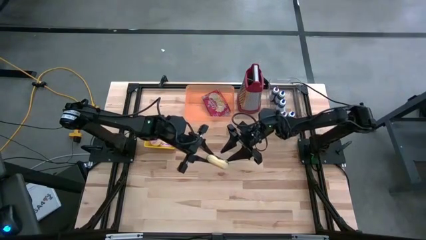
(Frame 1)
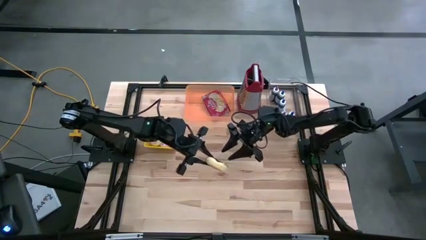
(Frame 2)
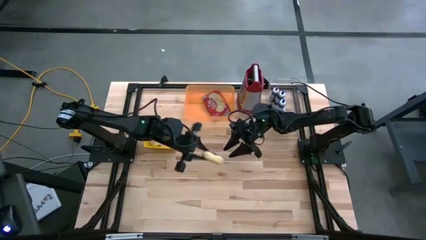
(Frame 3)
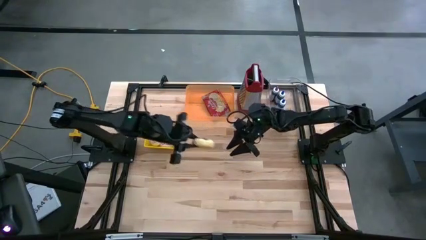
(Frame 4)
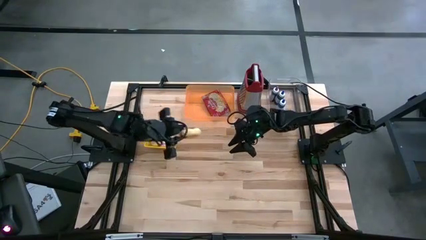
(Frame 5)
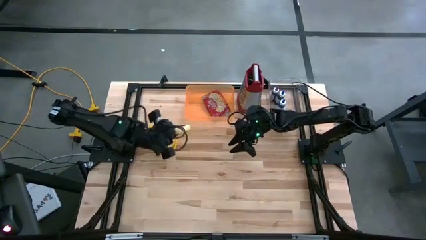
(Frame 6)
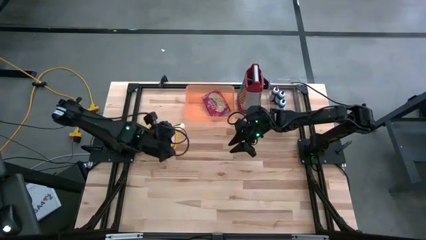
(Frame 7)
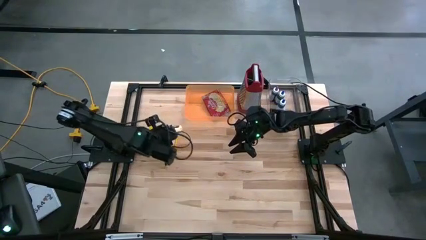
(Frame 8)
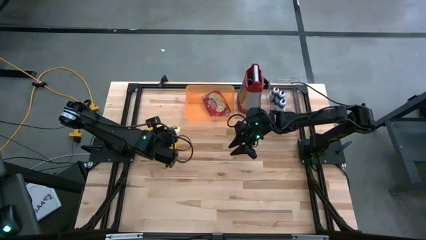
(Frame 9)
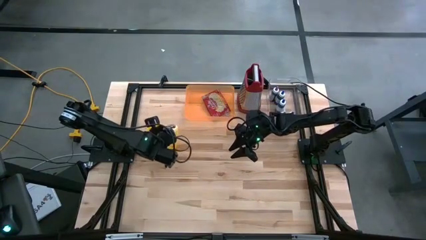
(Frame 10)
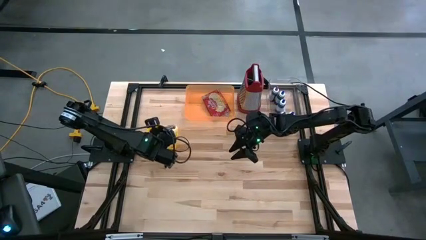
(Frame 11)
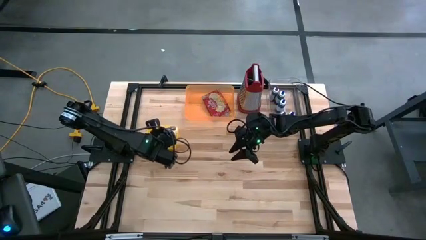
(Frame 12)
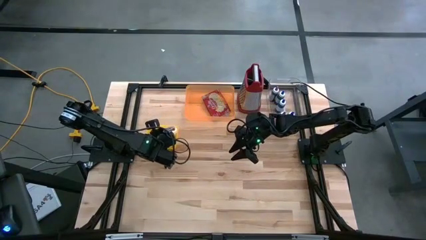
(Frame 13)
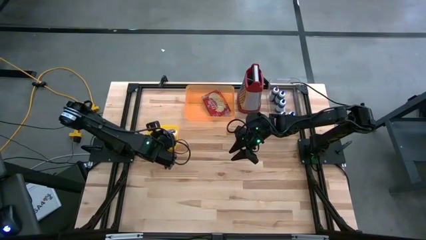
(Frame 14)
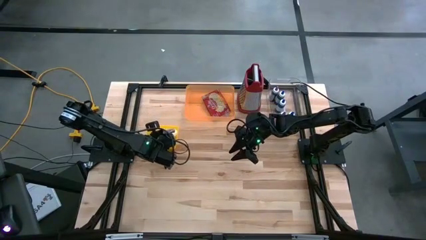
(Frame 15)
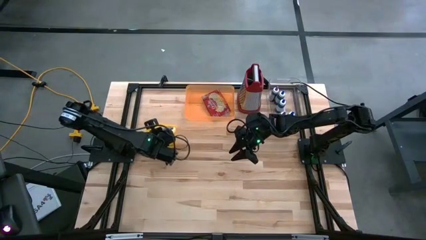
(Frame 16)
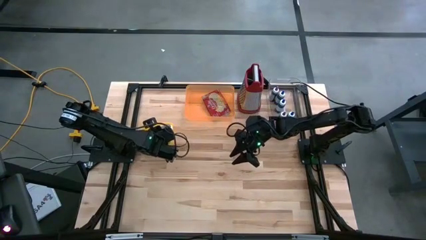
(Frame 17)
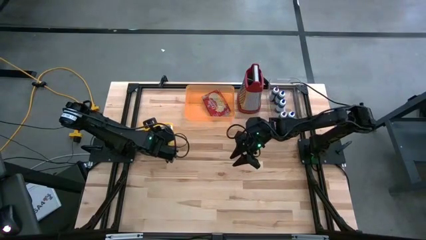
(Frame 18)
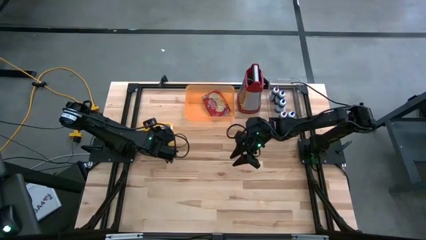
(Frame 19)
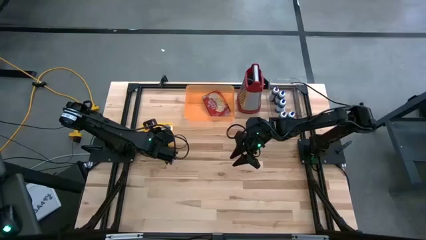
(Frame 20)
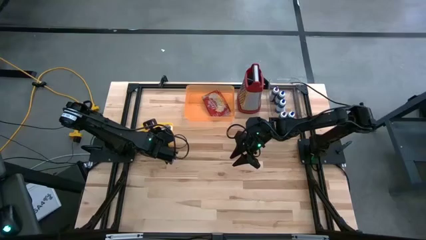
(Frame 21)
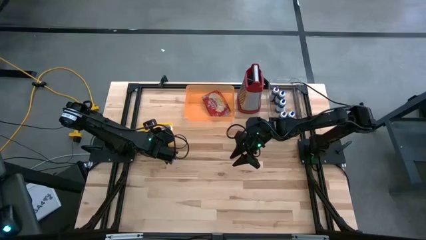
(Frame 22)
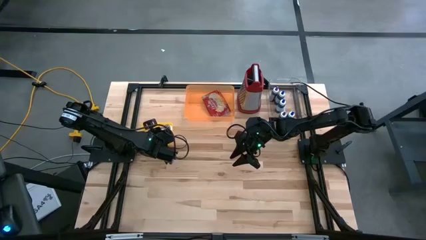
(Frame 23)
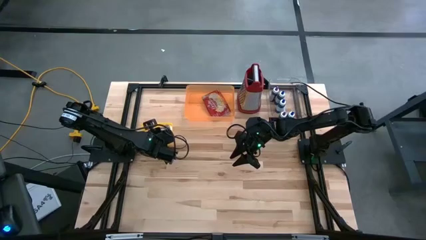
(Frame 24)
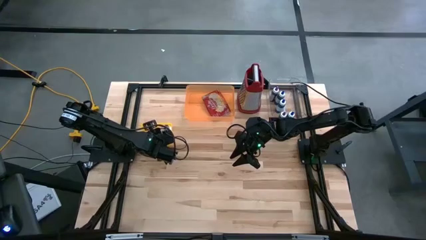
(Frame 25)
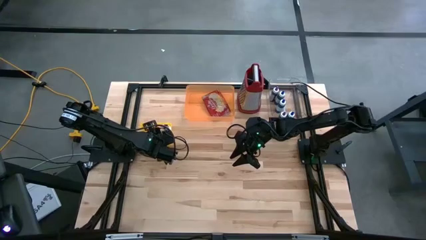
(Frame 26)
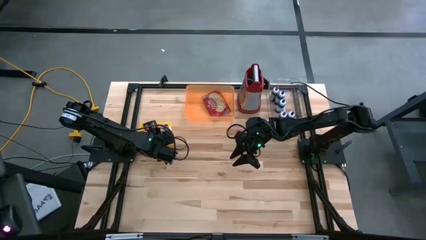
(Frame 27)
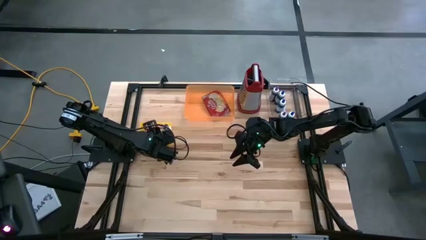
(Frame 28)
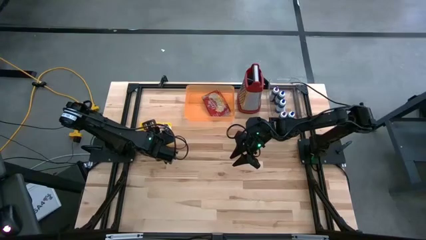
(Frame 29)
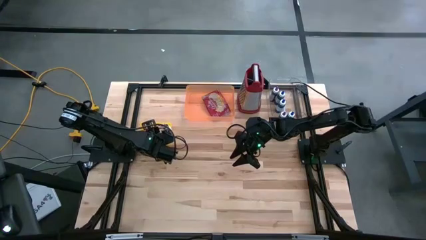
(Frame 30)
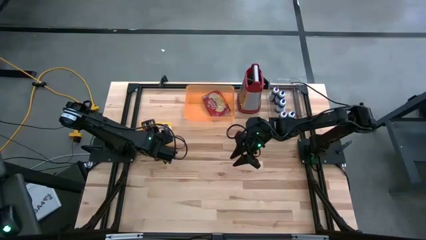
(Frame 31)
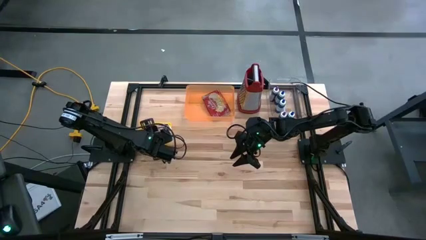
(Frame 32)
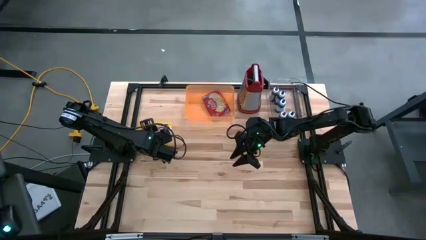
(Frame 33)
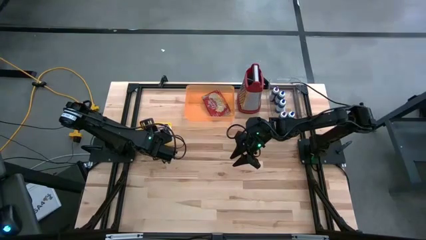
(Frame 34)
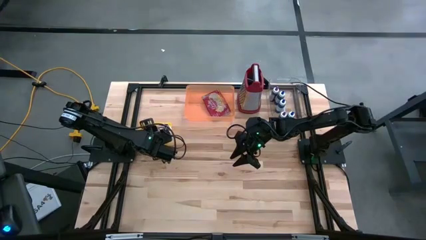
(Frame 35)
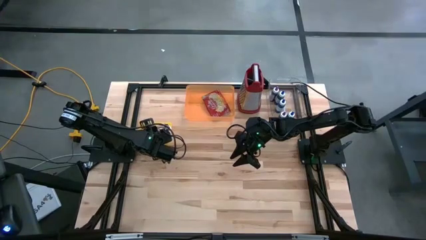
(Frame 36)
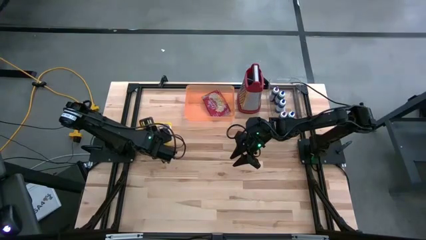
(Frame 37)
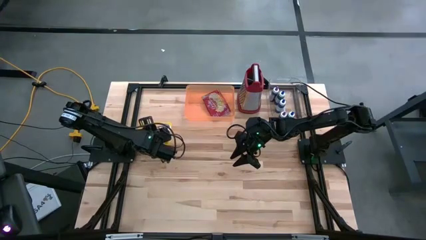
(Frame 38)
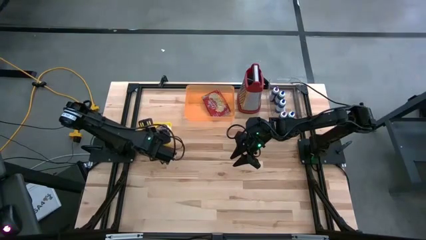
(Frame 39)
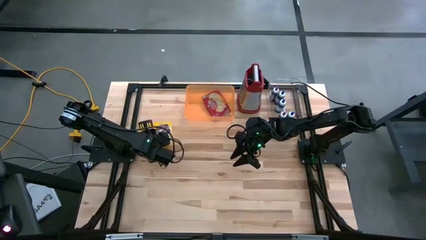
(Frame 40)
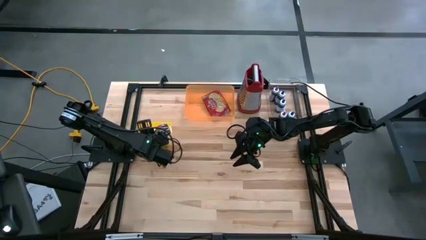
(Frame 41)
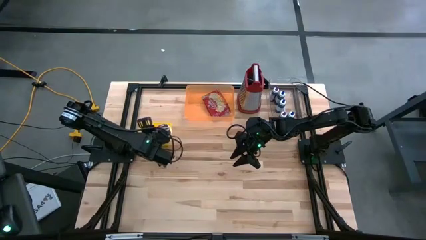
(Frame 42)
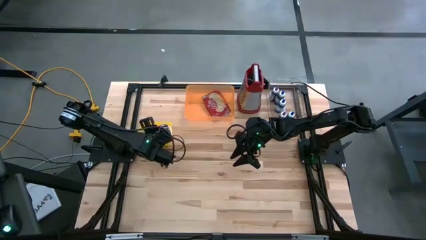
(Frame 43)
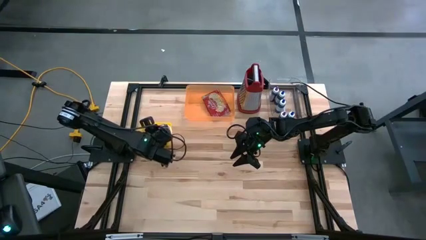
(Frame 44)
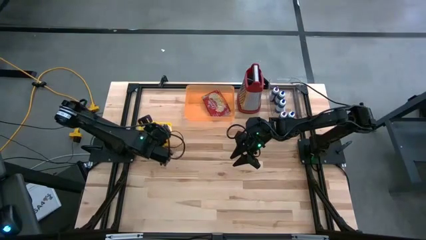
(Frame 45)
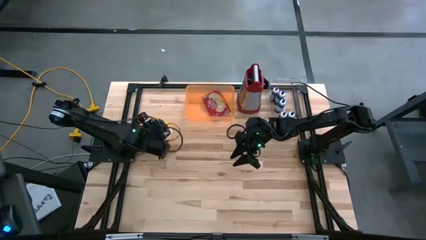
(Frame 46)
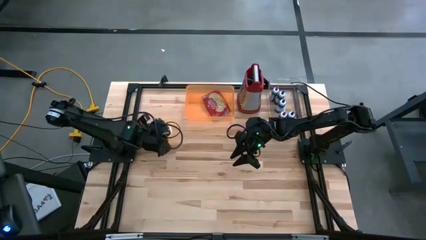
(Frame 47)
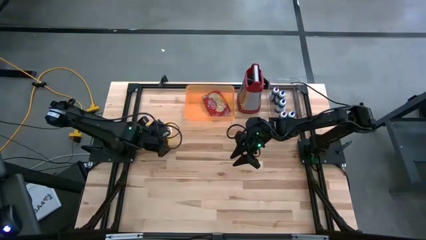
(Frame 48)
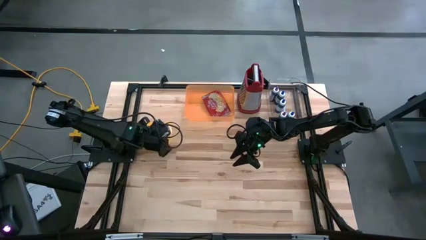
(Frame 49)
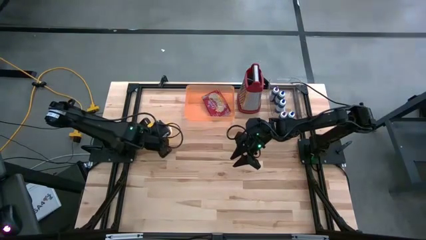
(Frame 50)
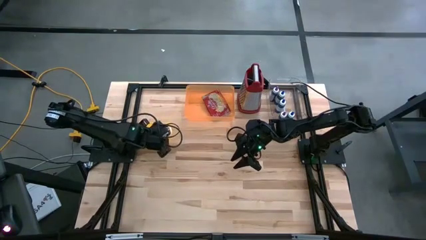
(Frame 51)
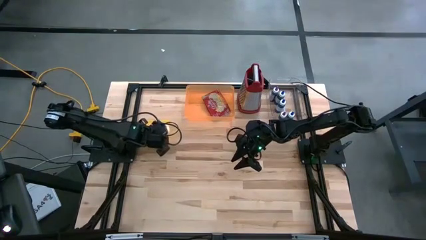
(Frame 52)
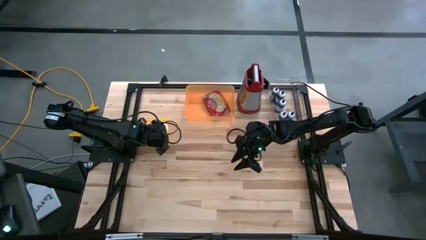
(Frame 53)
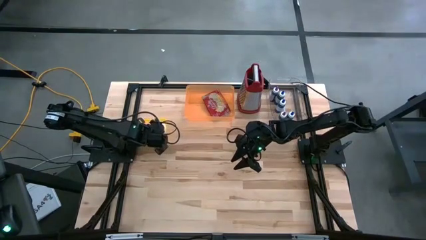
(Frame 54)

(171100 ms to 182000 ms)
Task: Pick & Place Food Item
Put the black donut into the yellow bin

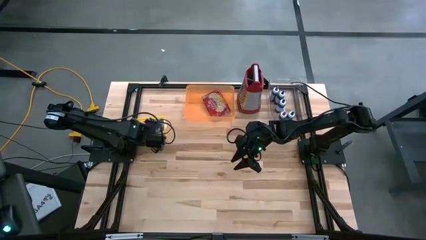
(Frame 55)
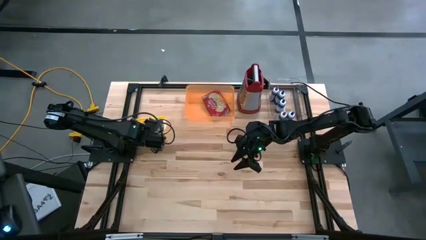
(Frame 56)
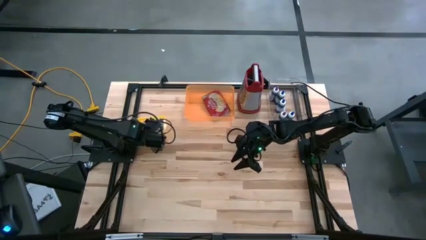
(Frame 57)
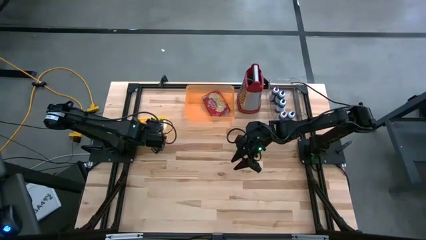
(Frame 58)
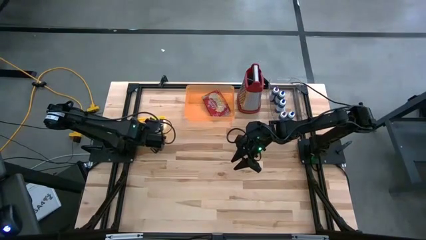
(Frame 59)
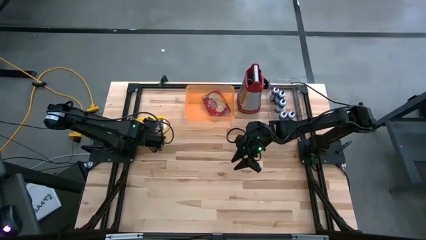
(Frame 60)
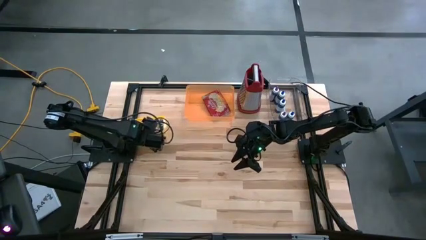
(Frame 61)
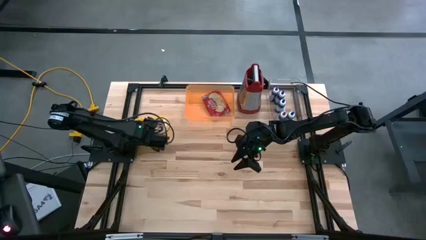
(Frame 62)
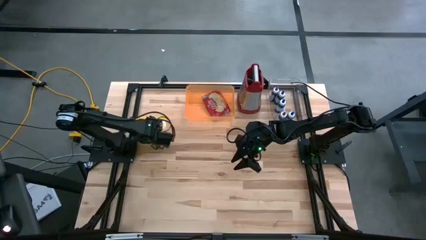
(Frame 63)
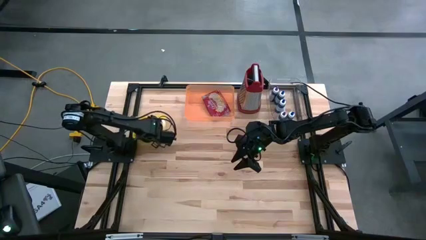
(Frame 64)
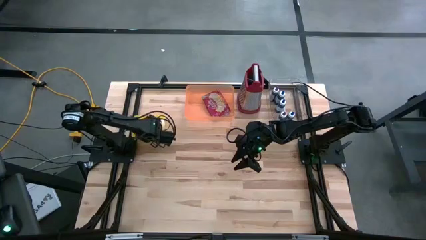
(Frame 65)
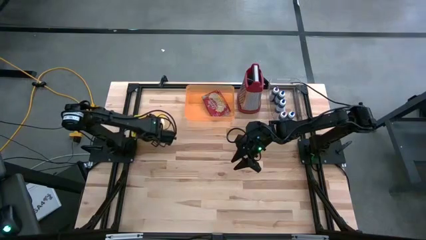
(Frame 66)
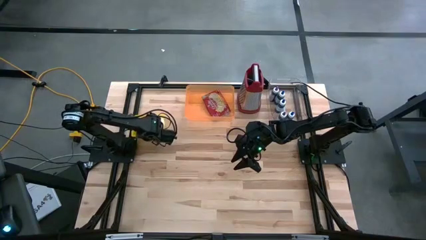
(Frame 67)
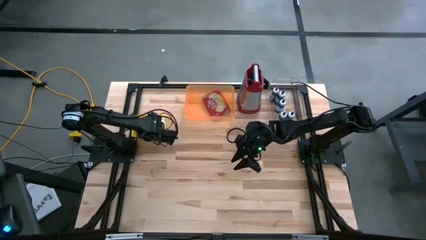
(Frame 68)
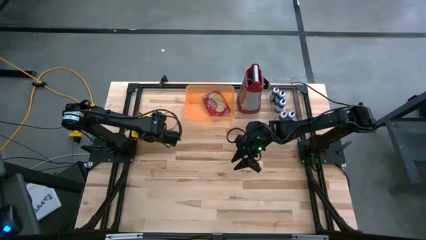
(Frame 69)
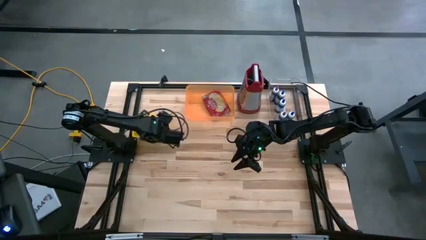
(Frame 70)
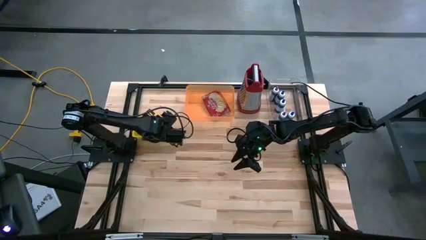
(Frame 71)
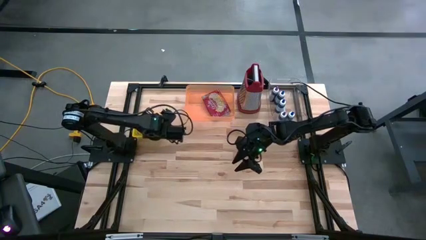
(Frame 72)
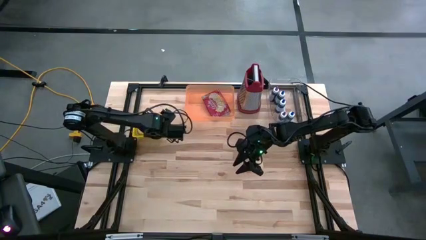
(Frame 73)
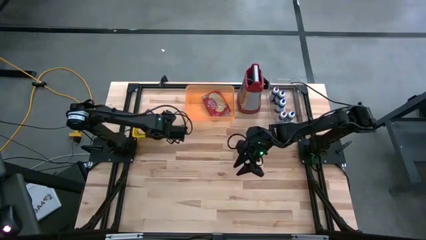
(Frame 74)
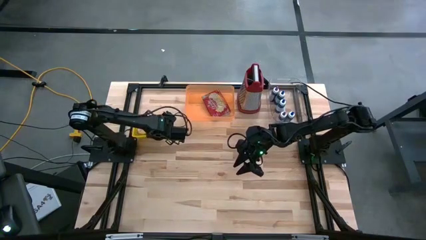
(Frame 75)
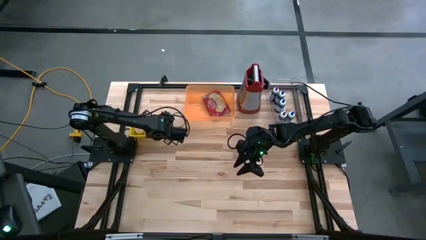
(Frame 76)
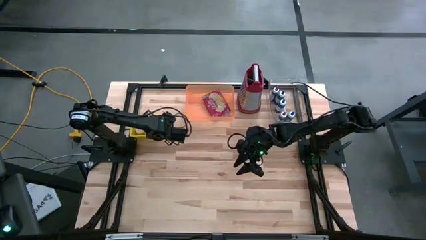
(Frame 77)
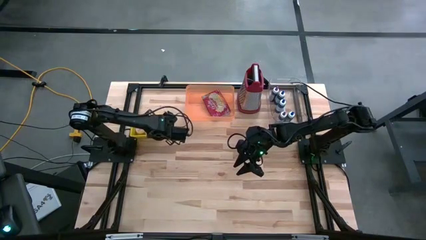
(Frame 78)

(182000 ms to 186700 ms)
Adjust the donuts in the yellow bin

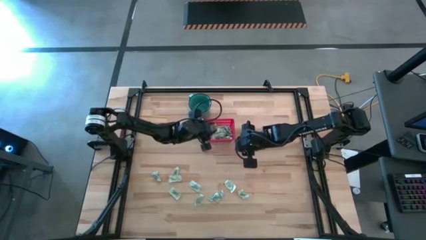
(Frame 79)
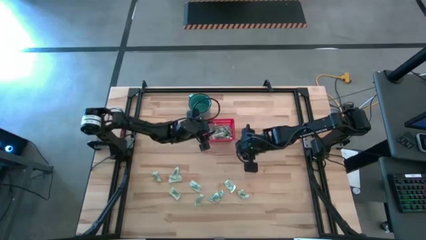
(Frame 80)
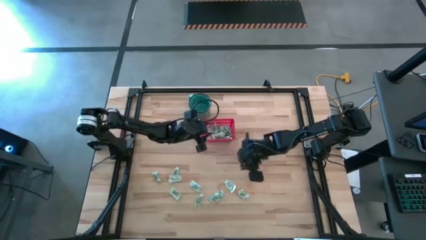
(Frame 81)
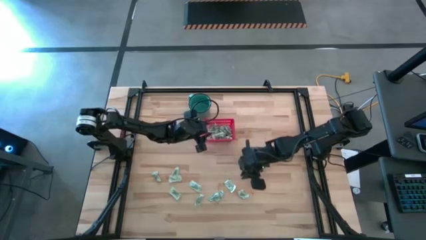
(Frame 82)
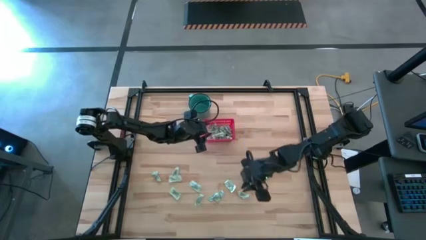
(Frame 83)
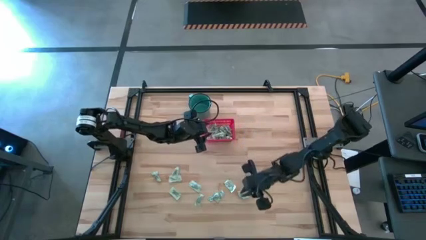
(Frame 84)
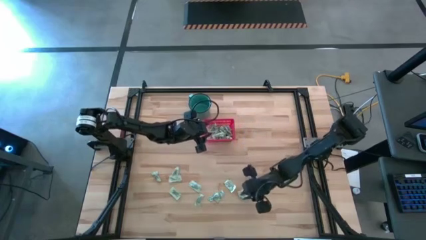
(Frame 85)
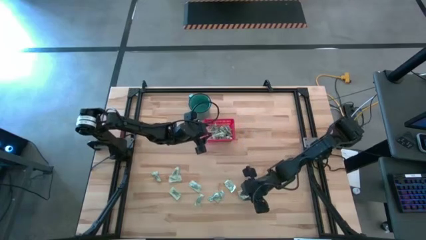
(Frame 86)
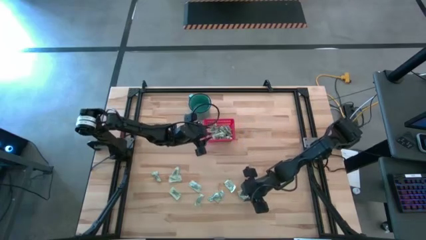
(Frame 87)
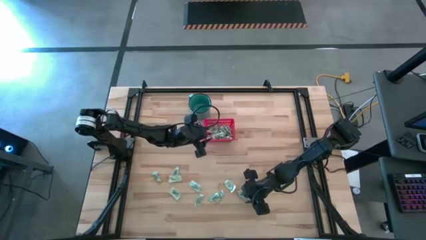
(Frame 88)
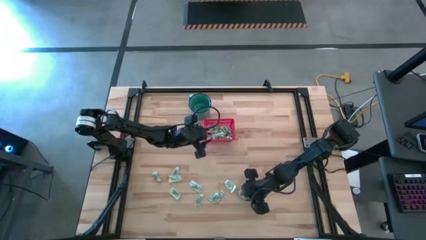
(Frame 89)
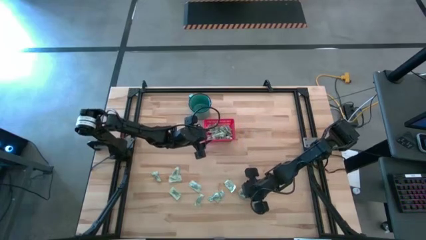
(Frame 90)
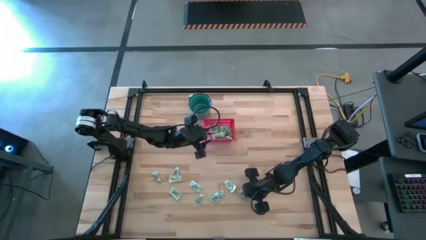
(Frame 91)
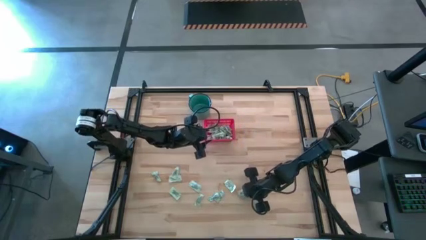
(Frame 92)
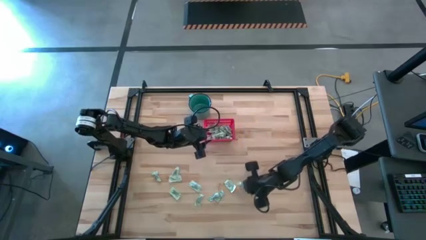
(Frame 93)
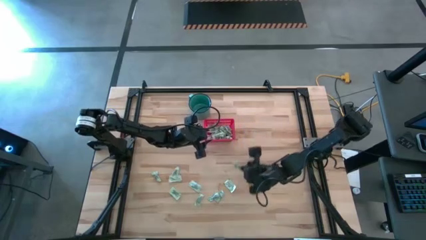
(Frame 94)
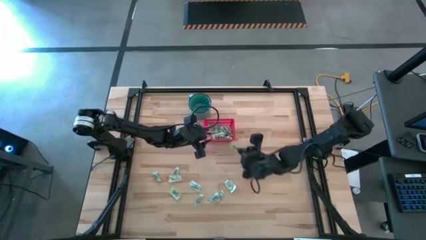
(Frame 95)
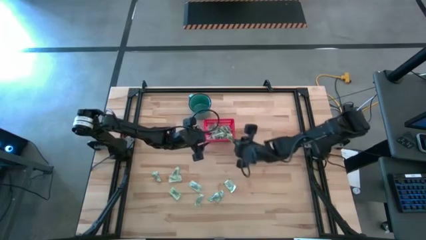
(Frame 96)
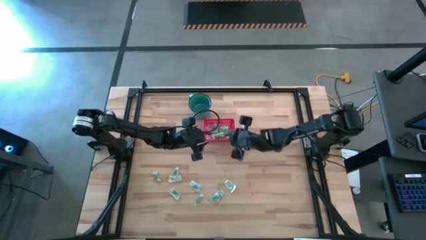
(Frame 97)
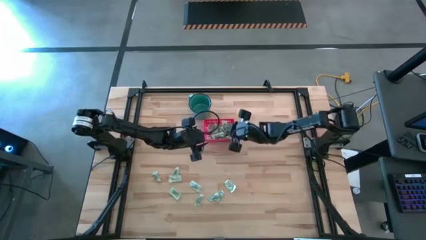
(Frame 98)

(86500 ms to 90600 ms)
Task: Pick and place items into bin
Put the light green stevia packet into the red bin
